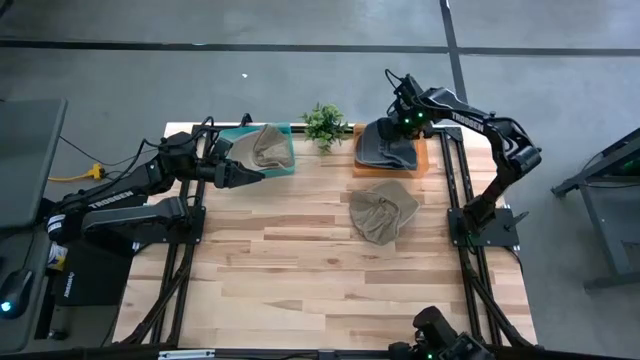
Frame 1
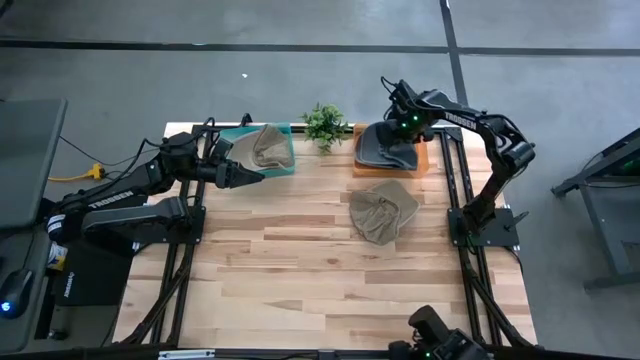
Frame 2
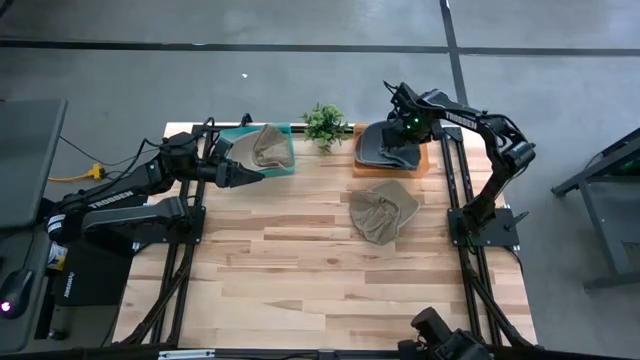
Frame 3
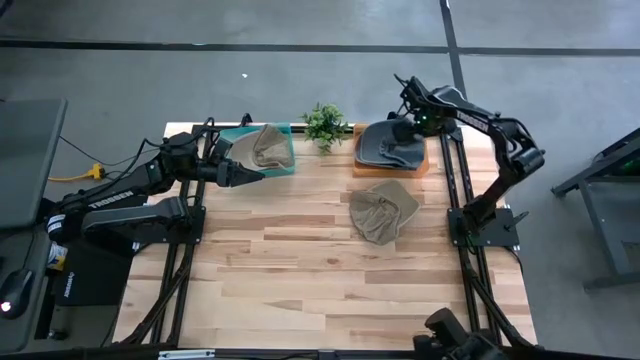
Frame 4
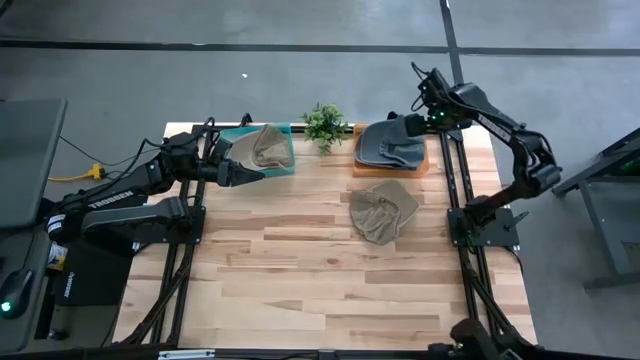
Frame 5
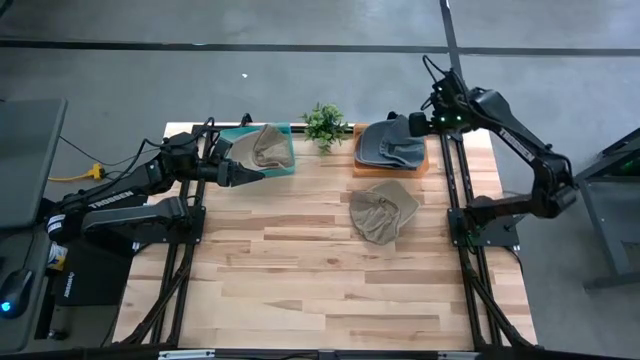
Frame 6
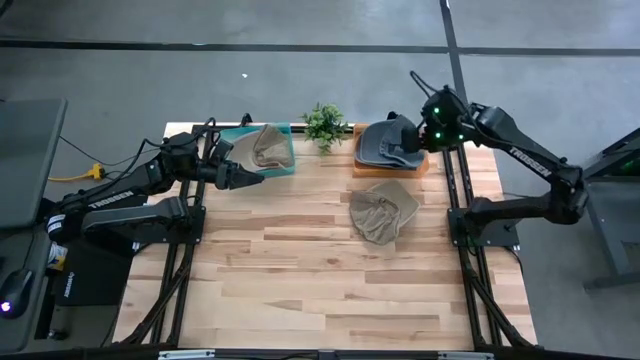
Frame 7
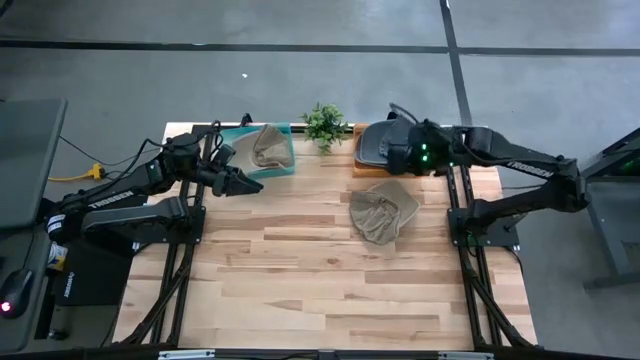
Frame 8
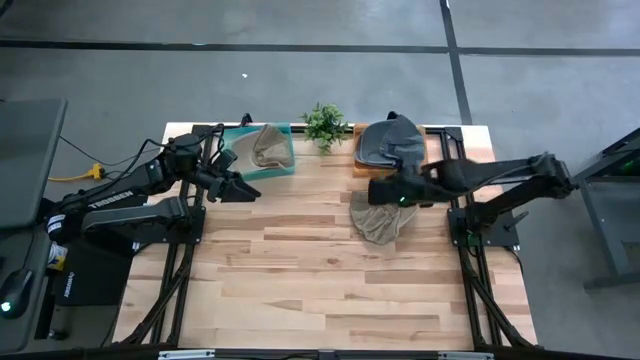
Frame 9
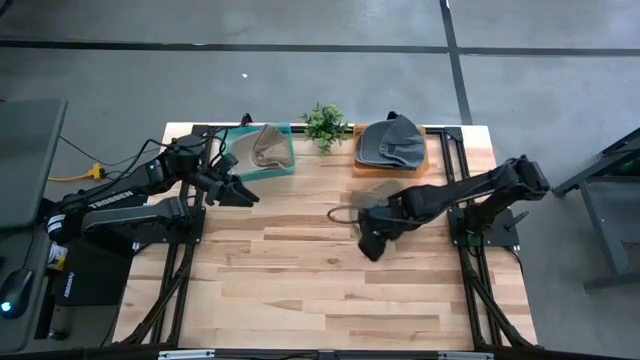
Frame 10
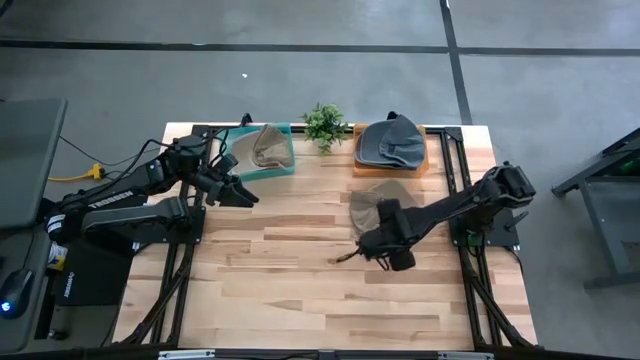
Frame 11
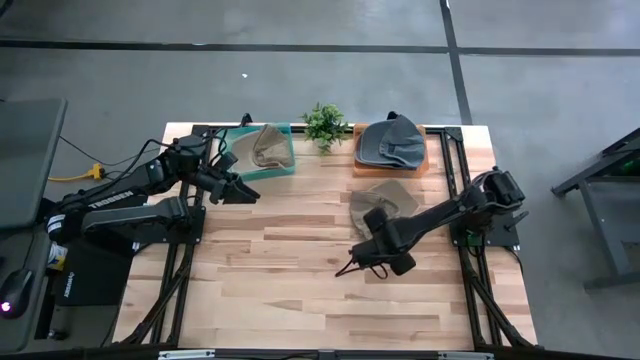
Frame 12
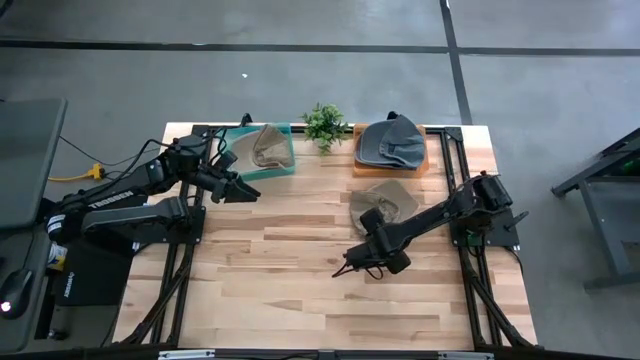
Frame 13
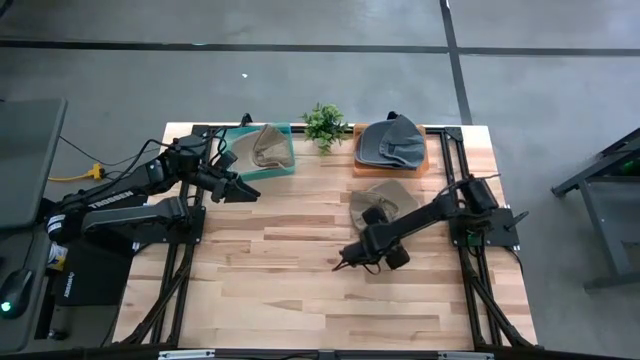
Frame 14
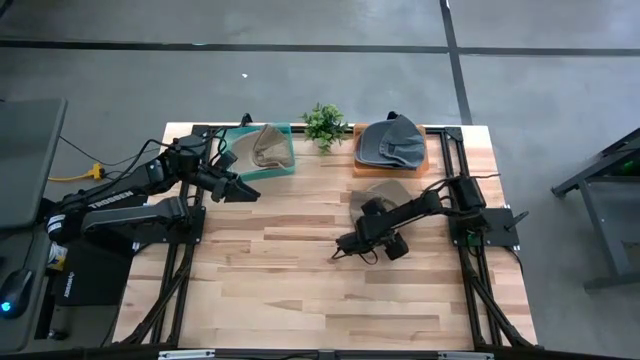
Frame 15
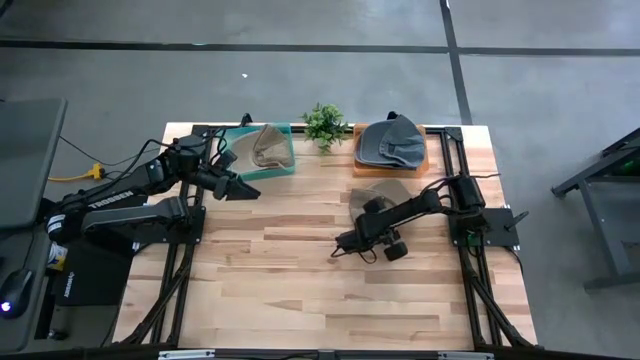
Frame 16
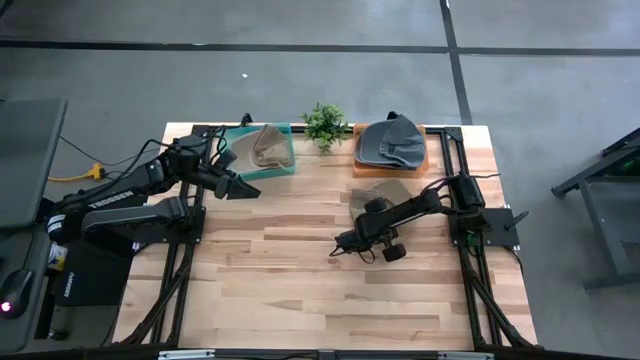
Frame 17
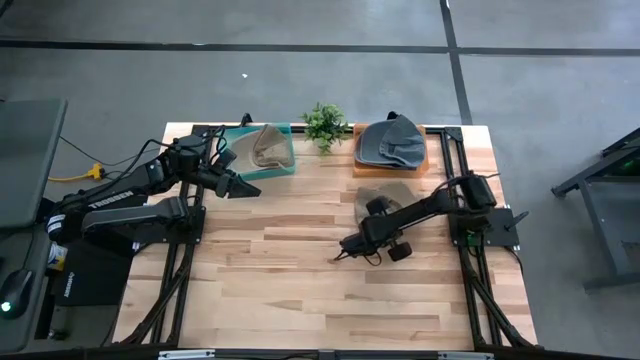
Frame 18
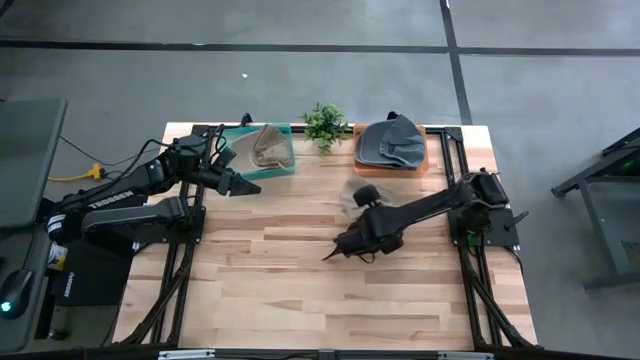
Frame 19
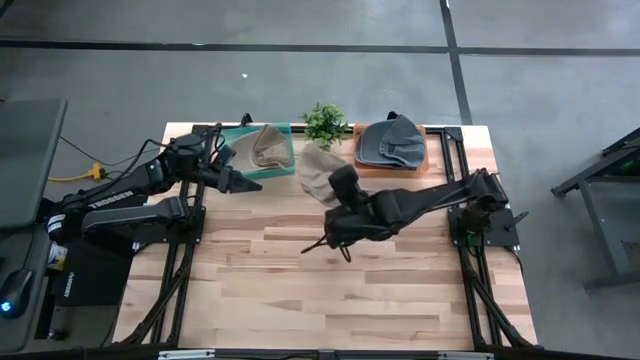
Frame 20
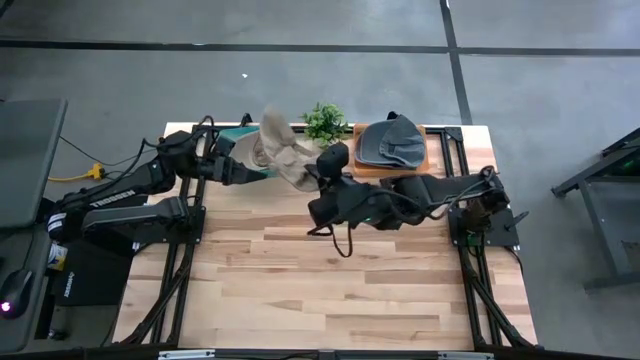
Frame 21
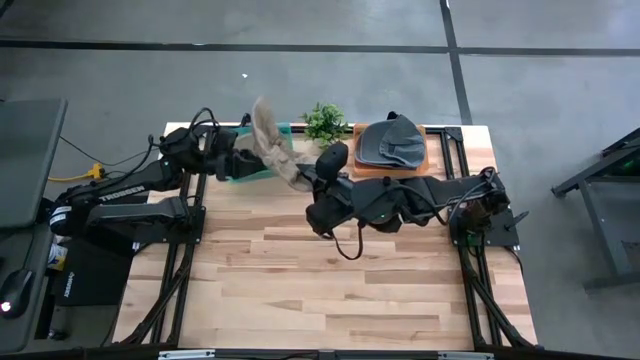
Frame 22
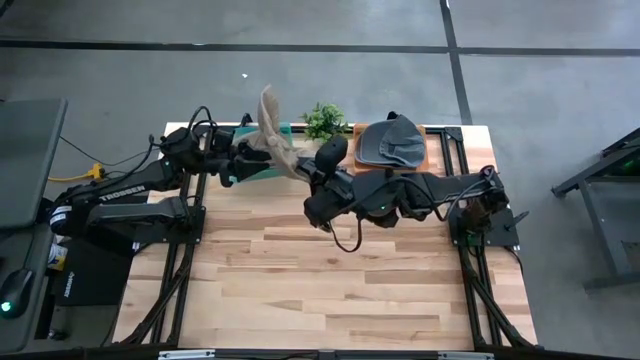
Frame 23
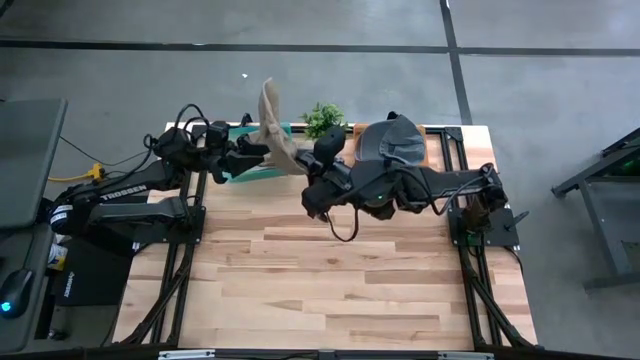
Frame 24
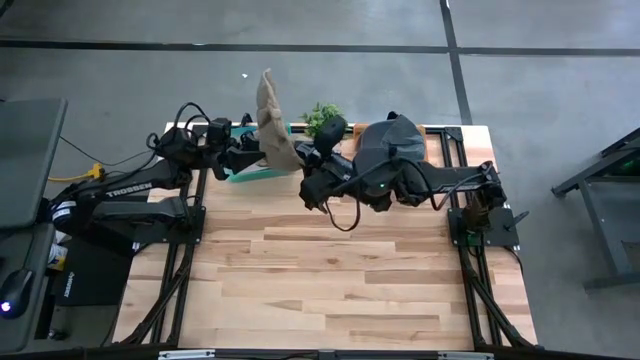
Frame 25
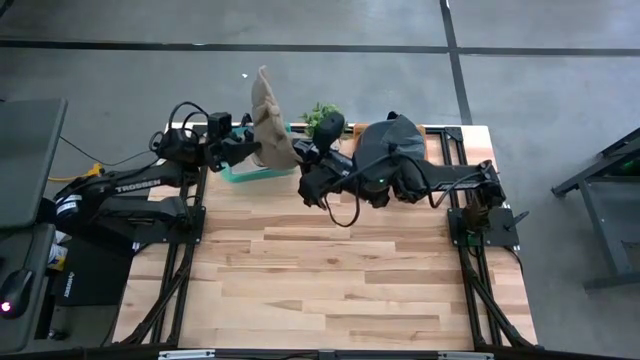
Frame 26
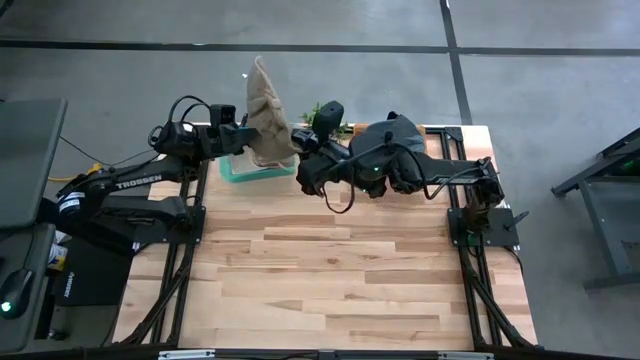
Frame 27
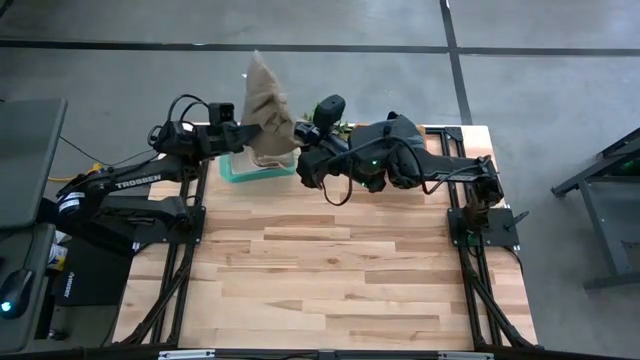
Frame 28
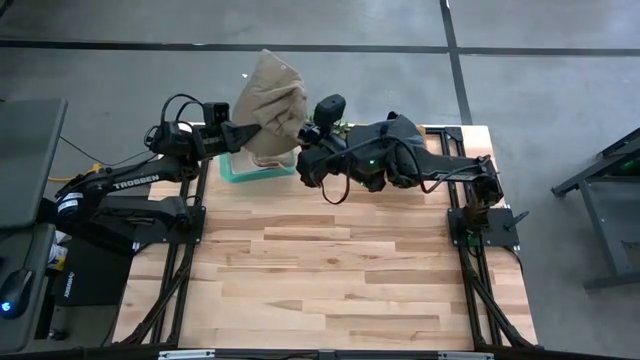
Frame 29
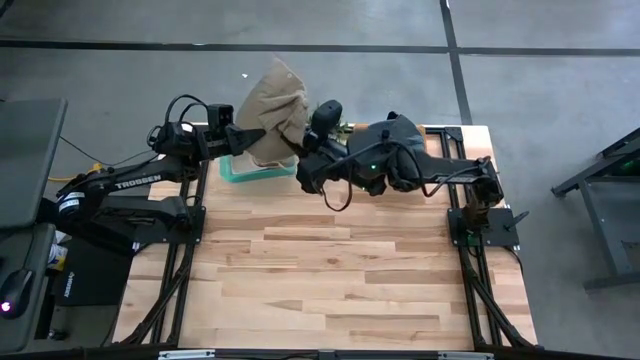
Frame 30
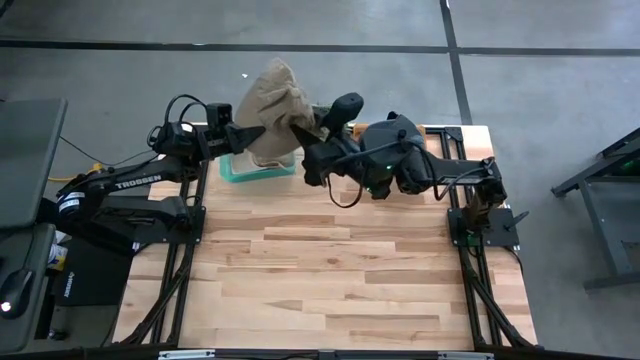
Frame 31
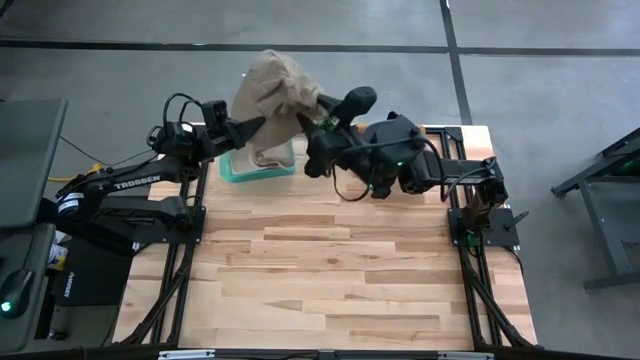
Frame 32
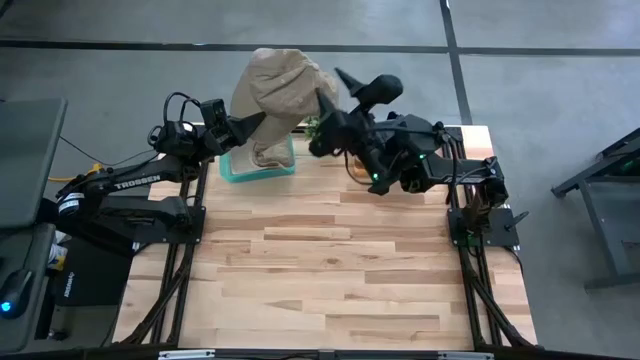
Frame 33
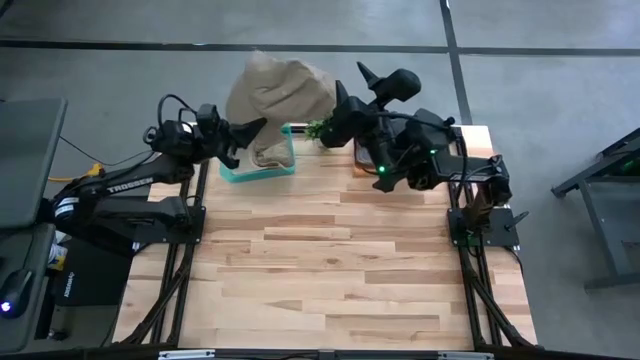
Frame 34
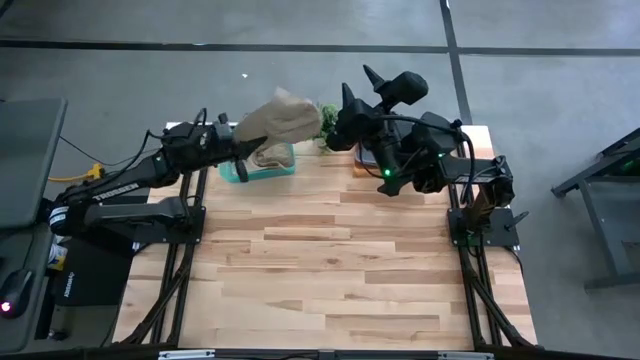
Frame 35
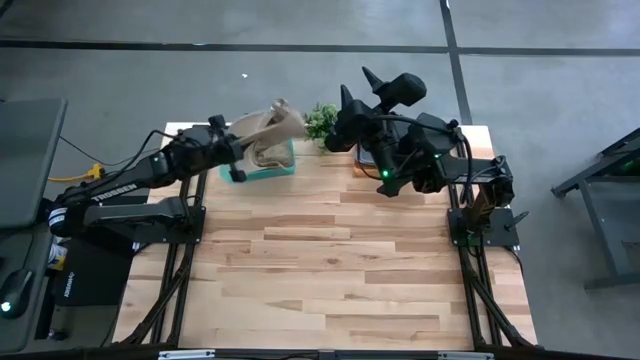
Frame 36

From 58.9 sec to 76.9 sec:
Task: Pick & Place hat
Put the brown cap into the blue bin

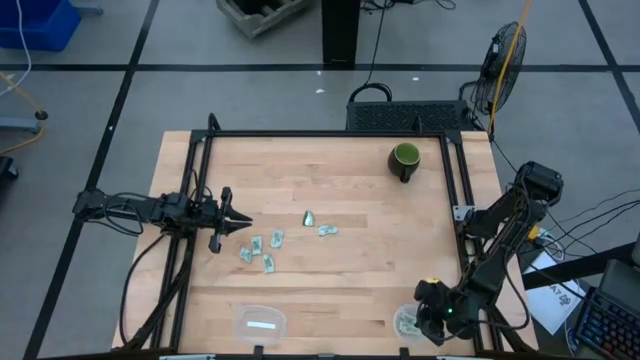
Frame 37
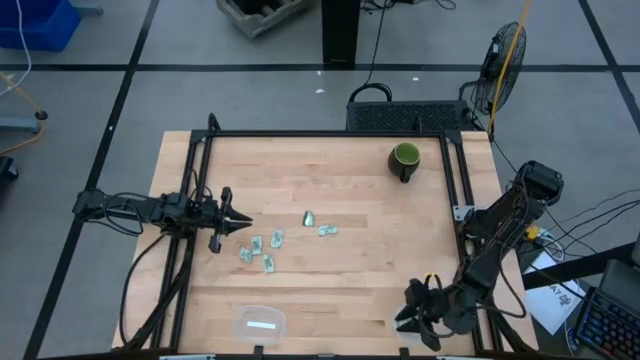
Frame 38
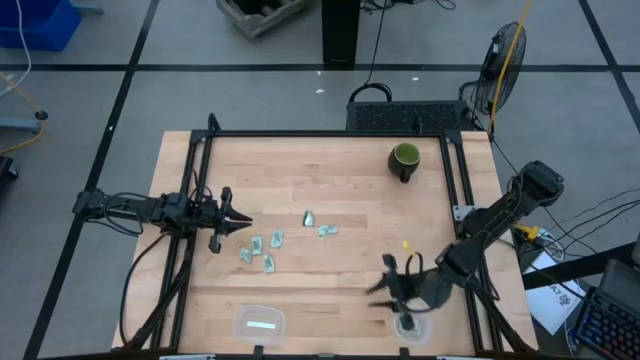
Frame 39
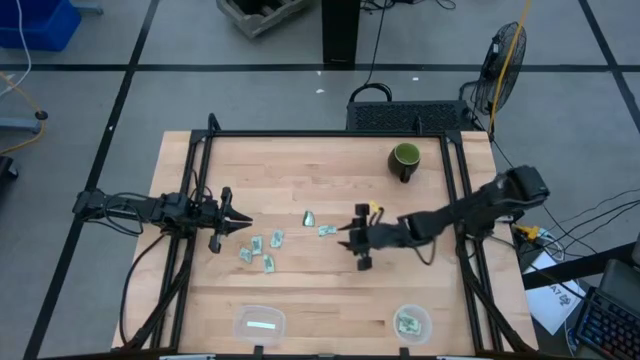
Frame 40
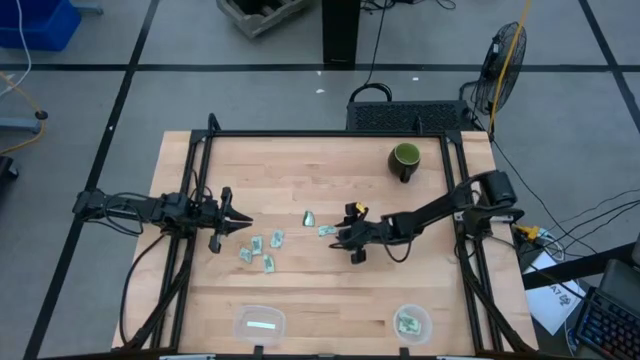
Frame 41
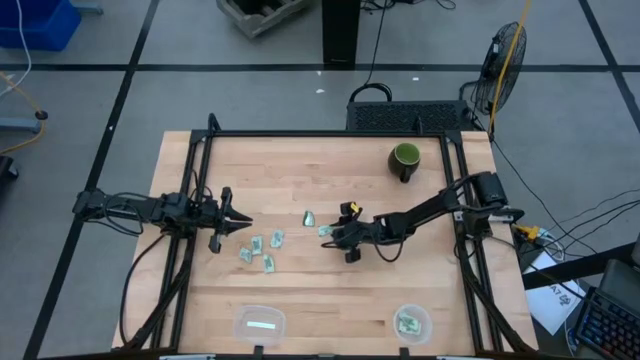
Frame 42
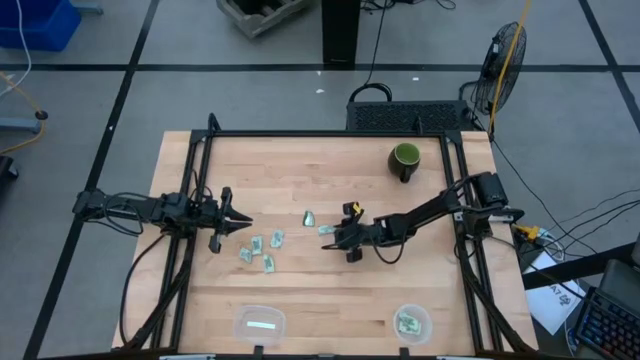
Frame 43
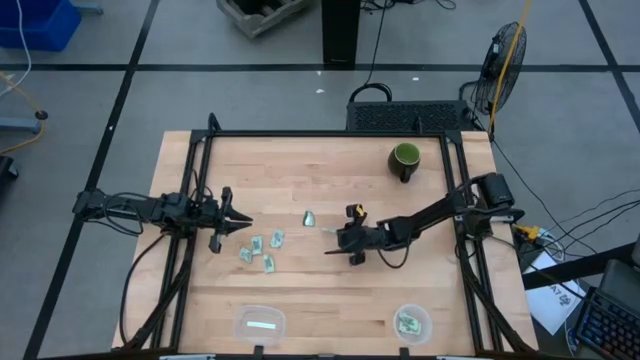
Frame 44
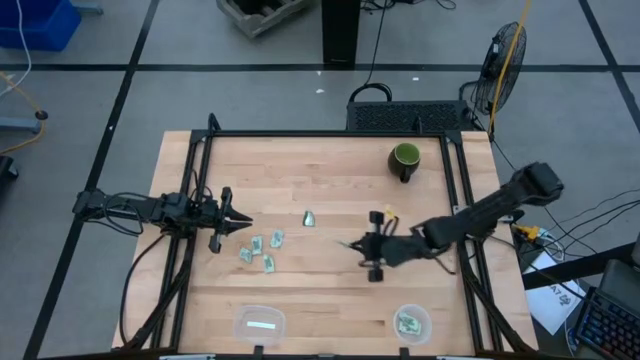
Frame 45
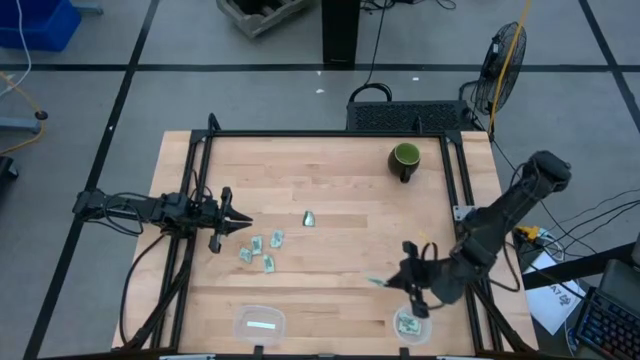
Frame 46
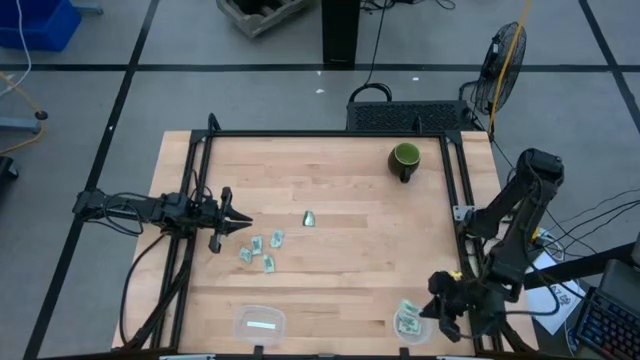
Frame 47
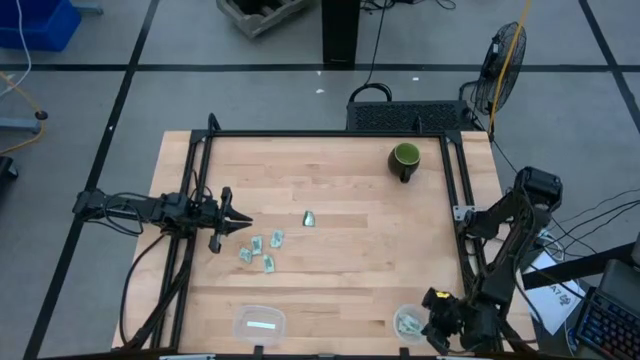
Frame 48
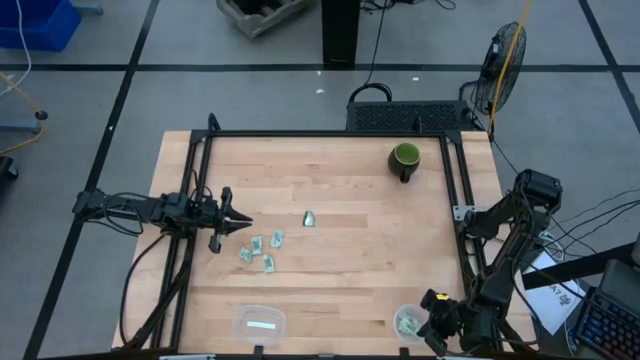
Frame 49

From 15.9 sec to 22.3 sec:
Task: Pick and place Stevia / Truvia into bins
Put the stevia packet into the right transparent container
